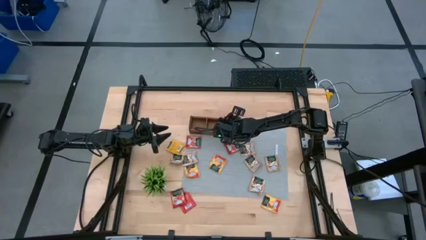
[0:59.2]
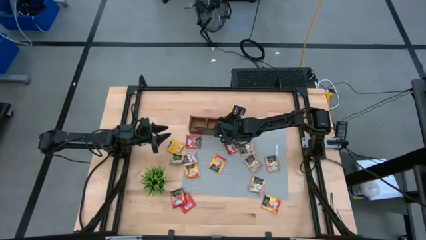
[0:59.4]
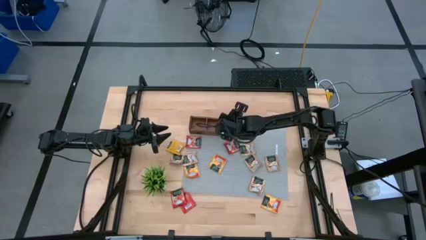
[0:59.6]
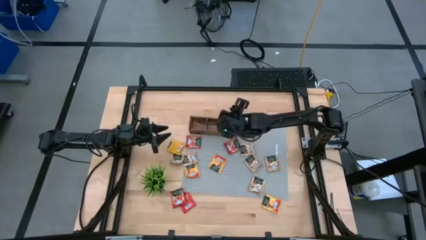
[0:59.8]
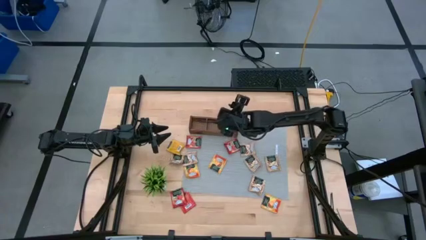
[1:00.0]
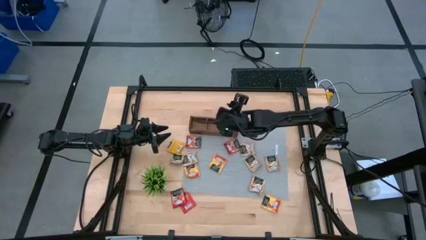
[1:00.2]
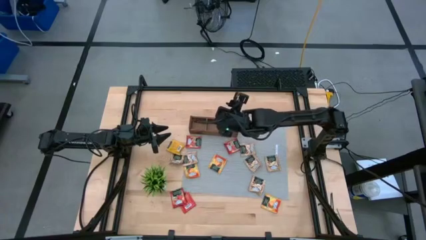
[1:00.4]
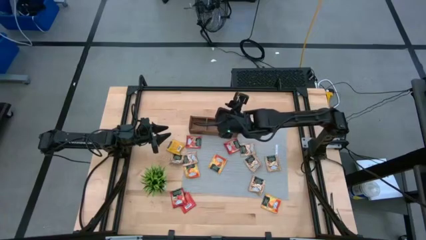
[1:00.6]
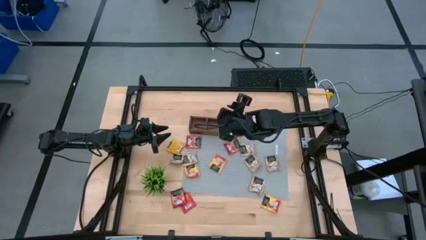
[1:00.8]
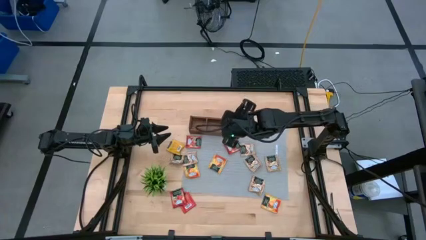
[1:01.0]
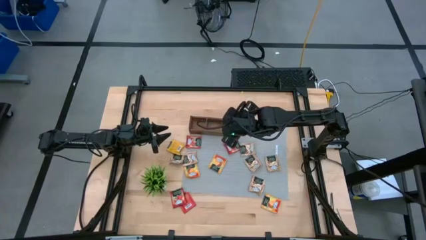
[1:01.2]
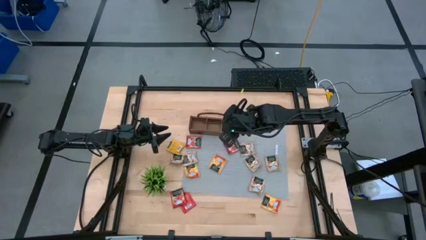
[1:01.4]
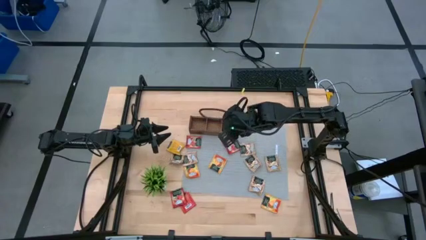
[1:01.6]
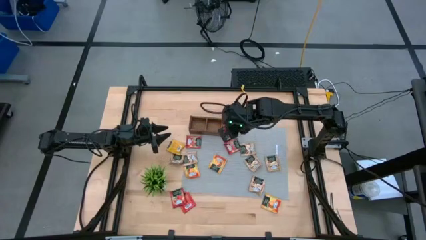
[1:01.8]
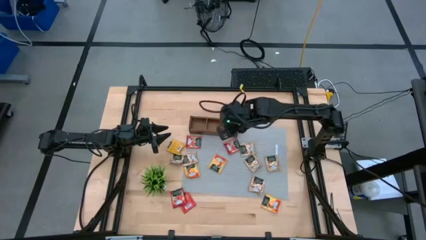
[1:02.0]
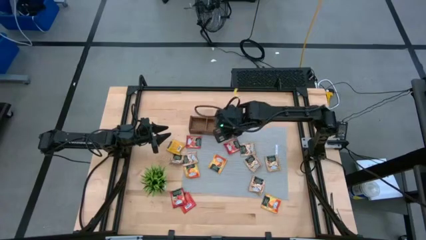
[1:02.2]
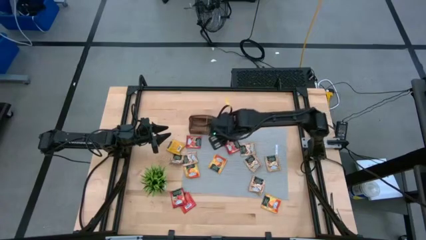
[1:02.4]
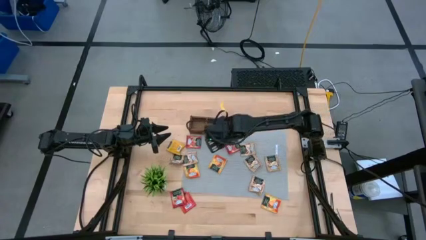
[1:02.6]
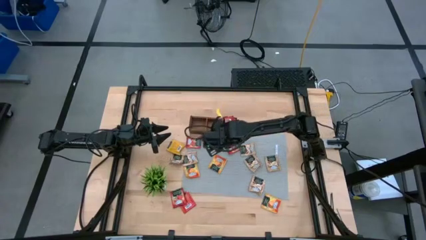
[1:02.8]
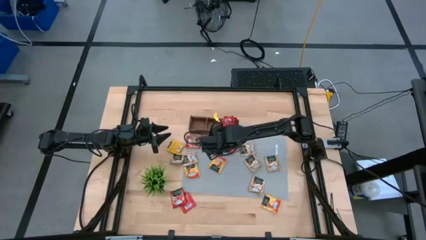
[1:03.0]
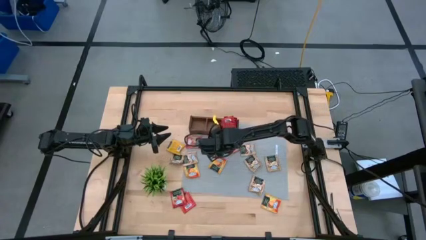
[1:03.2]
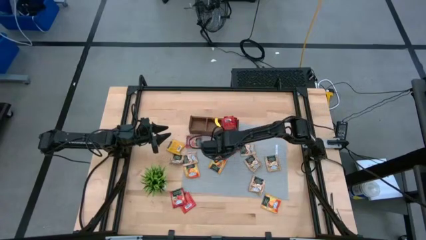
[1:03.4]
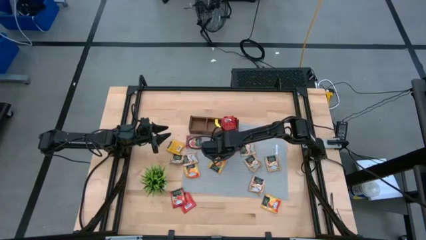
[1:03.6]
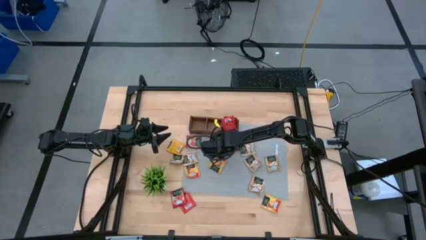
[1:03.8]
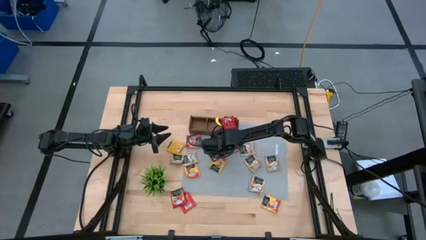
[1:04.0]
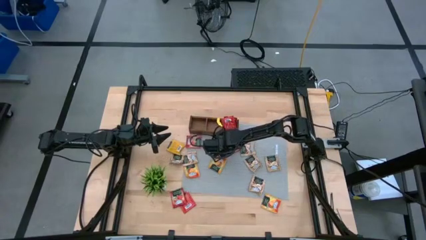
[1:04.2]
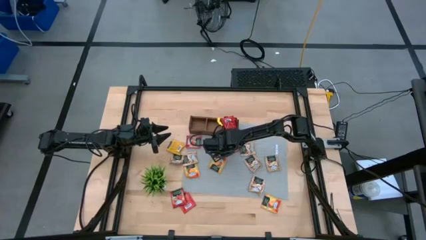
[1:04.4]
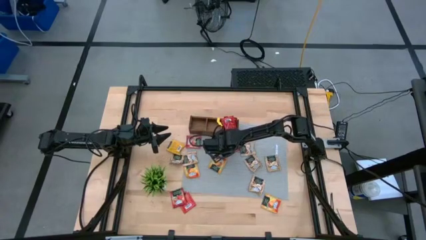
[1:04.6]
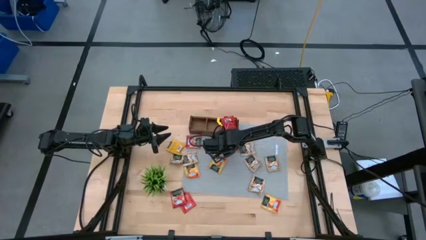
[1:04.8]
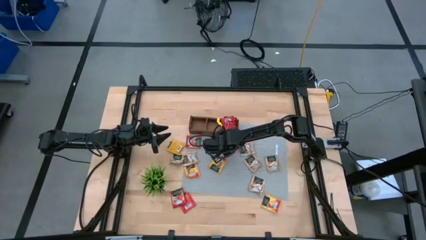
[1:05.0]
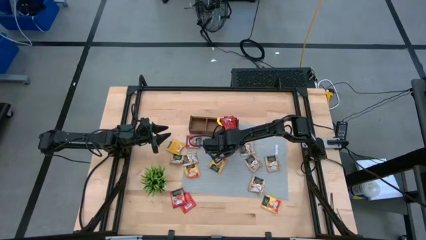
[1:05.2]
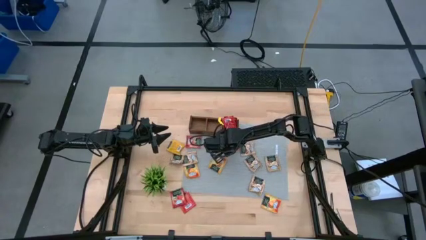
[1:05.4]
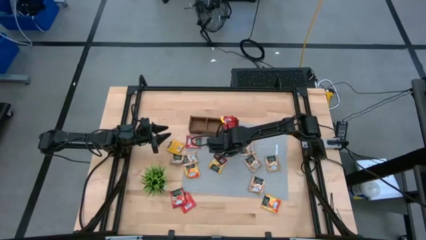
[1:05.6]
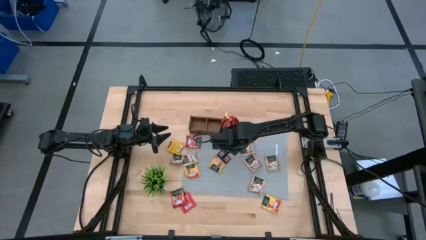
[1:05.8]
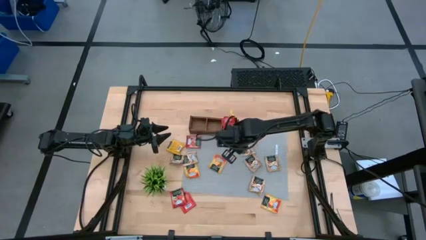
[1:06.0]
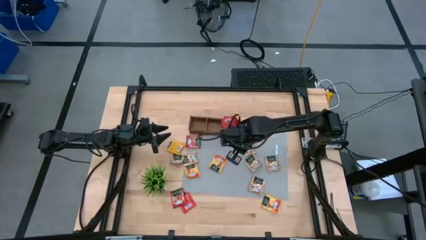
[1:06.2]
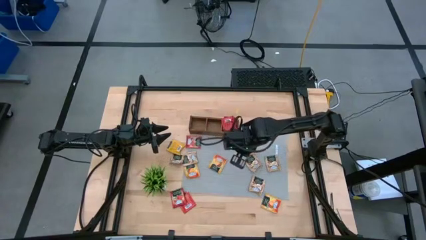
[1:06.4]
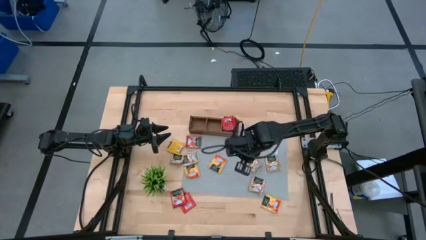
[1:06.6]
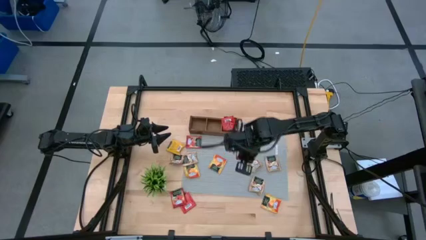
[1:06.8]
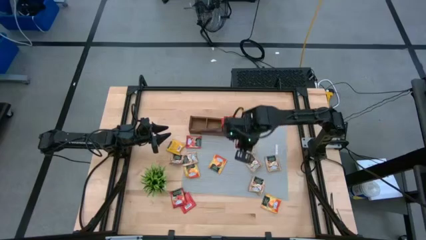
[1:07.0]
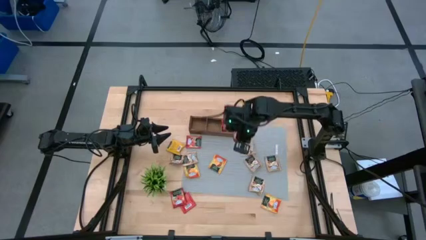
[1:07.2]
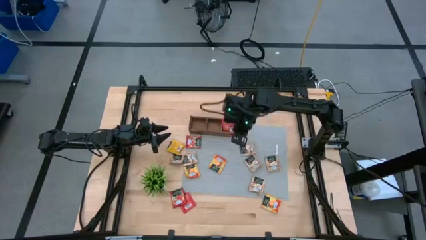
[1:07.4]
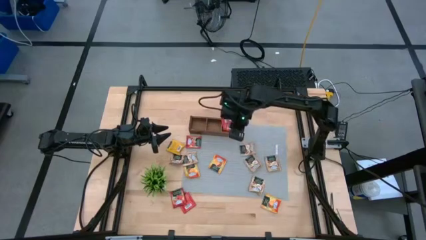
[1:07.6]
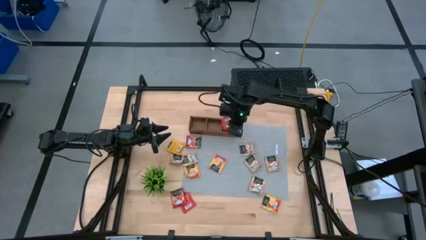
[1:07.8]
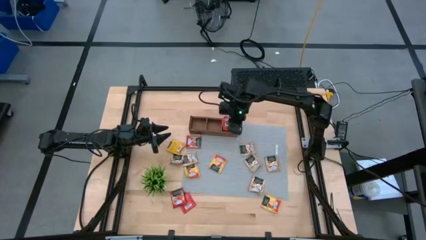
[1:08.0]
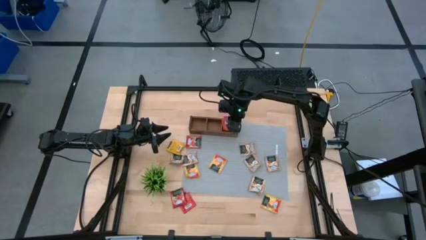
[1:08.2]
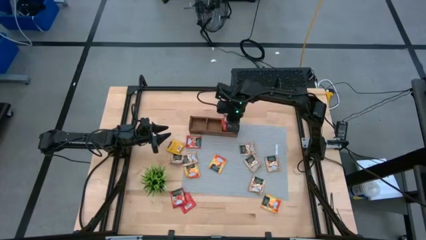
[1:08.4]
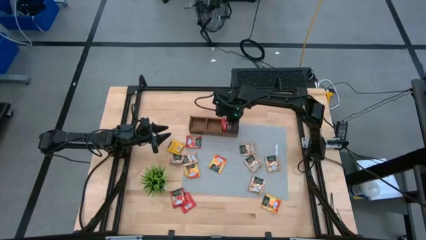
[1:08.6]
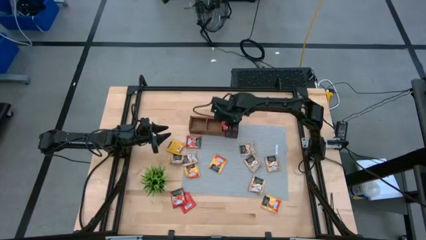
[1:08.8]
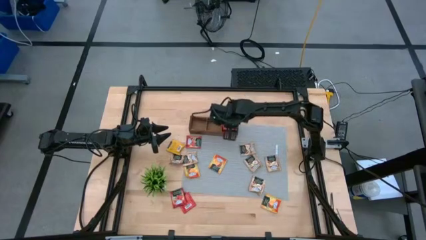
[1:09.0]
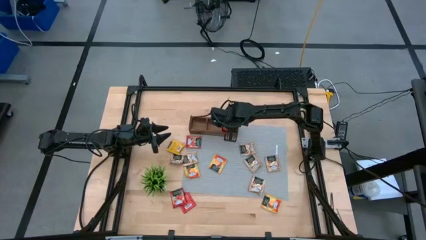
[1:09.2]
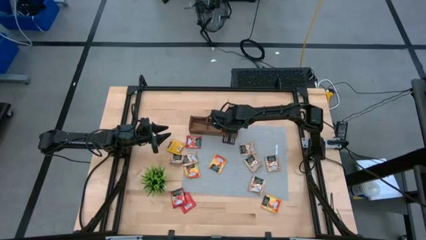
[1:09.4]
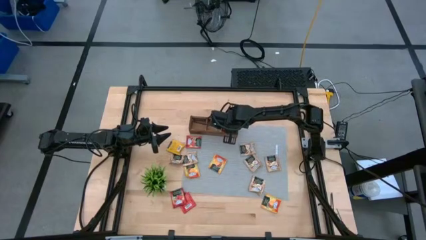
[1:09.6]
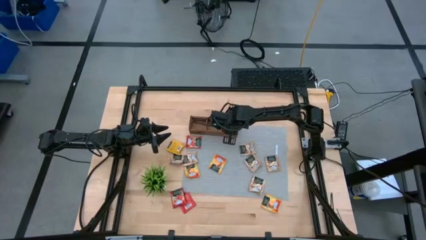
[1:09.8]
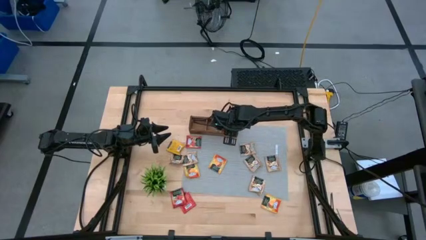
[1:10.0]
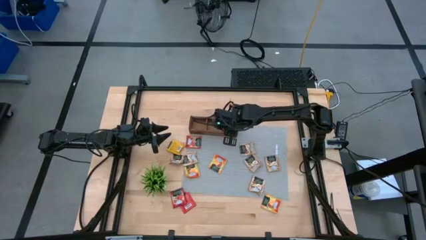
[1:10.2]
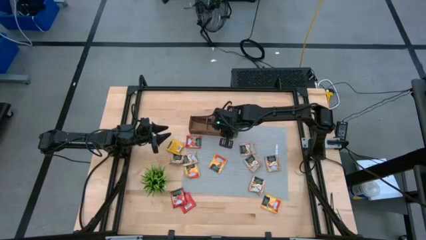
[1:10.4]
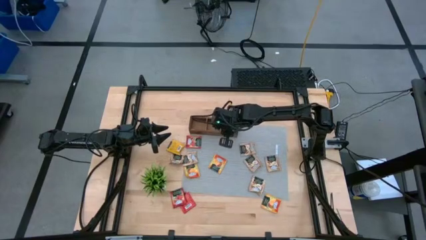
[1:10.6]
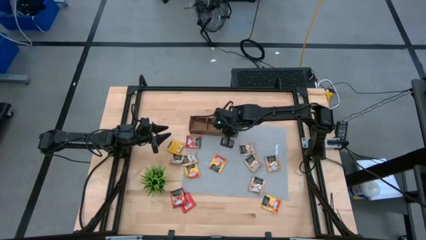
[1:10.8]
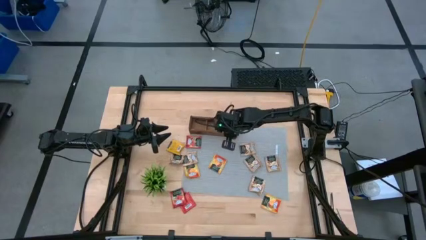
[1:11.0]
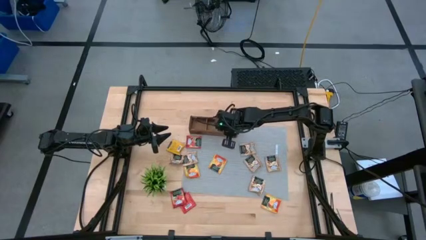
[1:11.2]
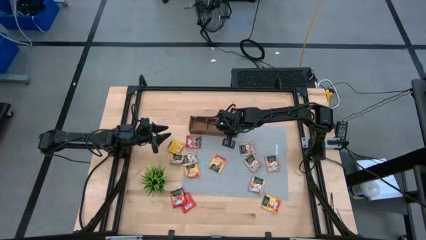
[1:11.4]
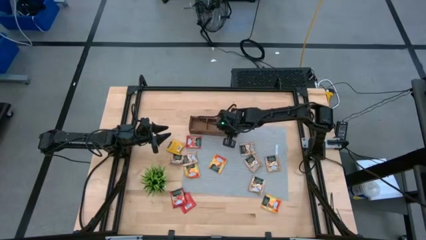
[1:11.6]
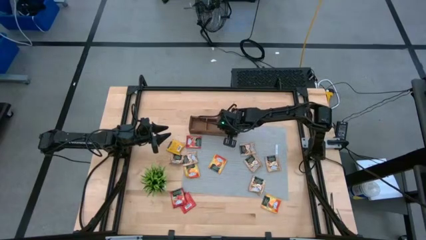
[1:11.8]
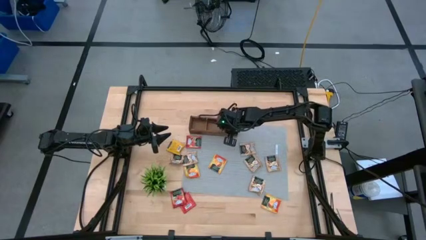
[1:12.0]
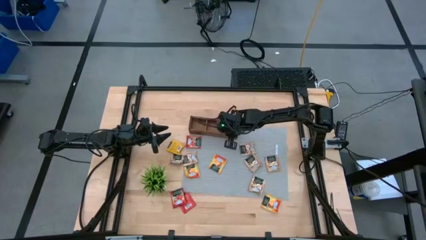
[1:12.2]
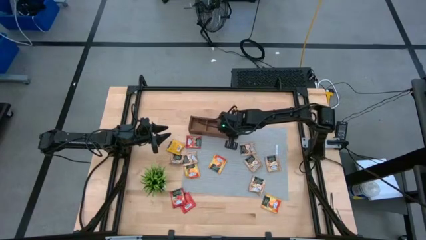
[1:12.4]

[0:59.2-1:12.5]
Task: Pick & Place Tea
Put the red tea bag into the right section of the wooden organizer
